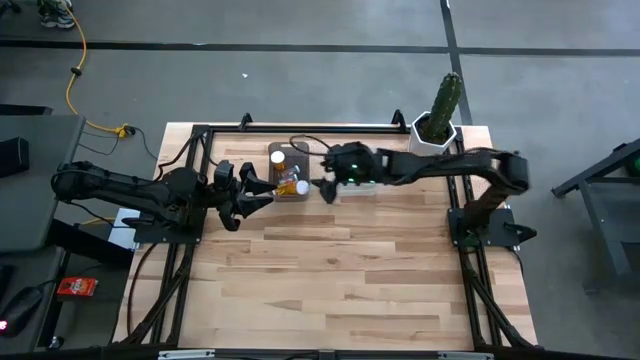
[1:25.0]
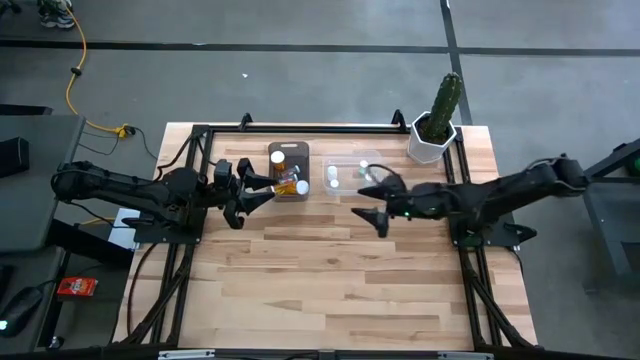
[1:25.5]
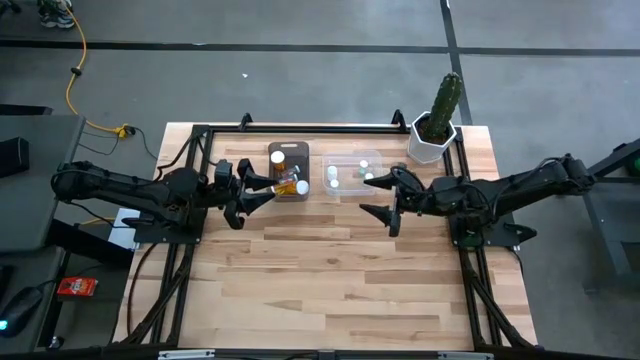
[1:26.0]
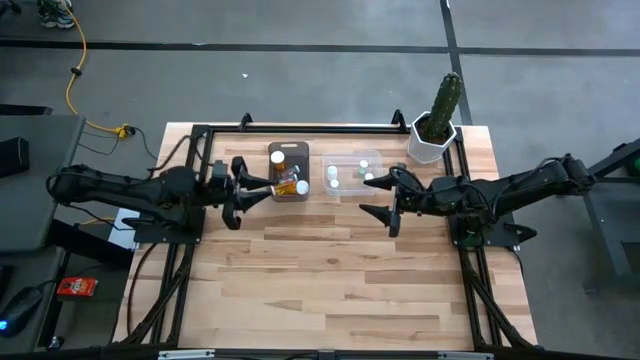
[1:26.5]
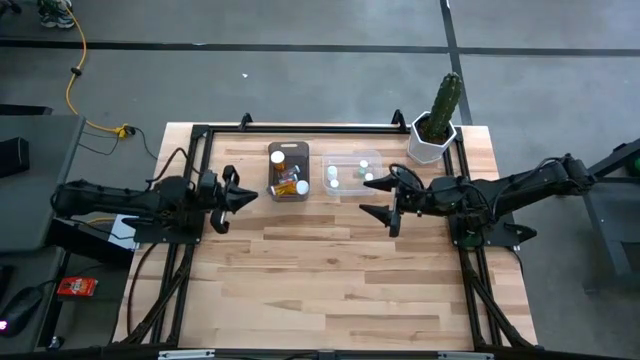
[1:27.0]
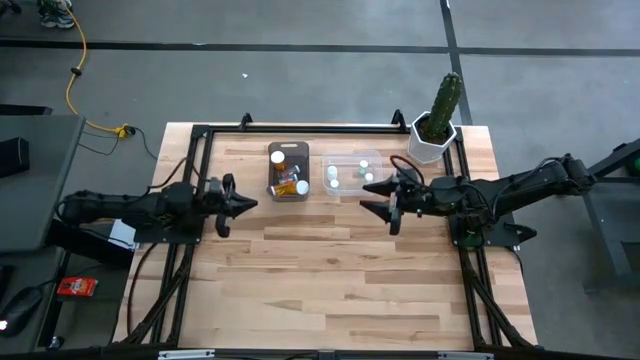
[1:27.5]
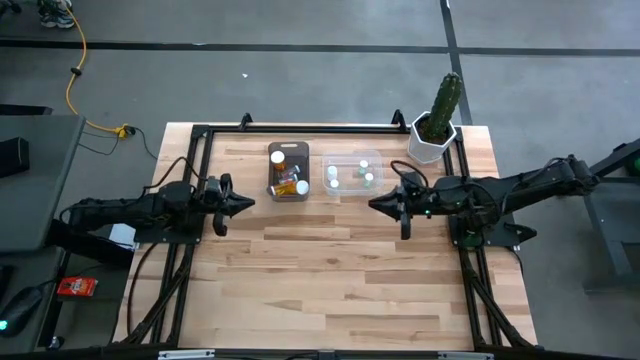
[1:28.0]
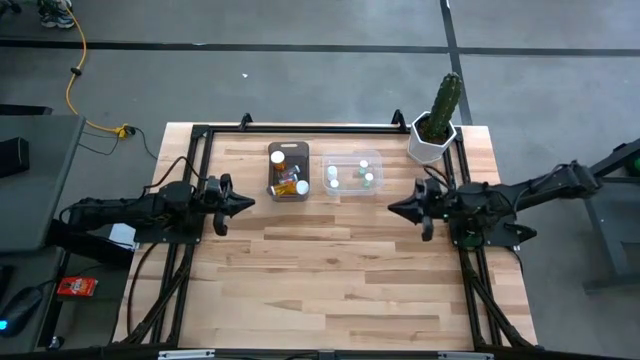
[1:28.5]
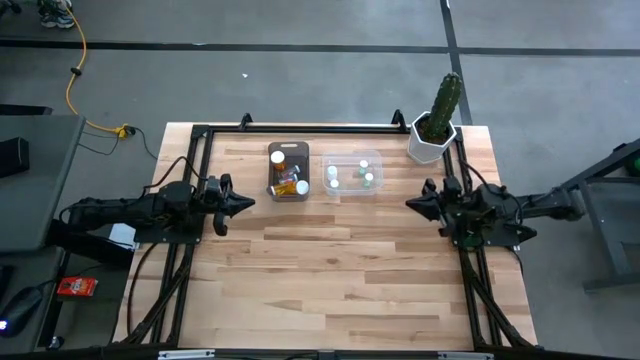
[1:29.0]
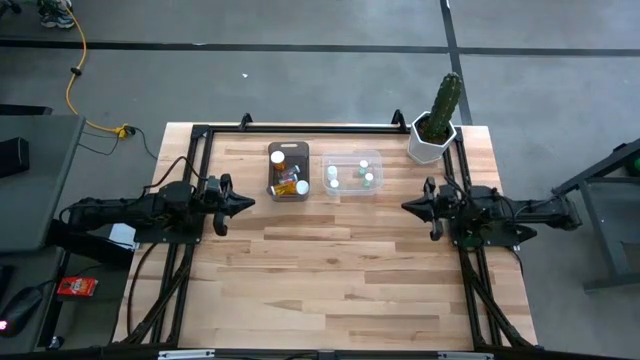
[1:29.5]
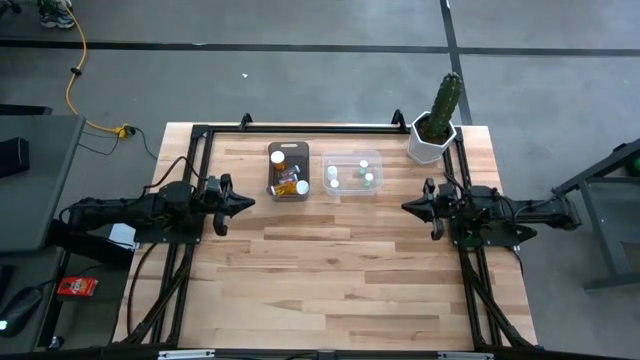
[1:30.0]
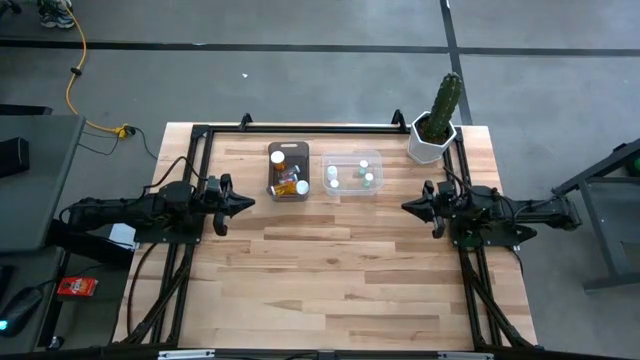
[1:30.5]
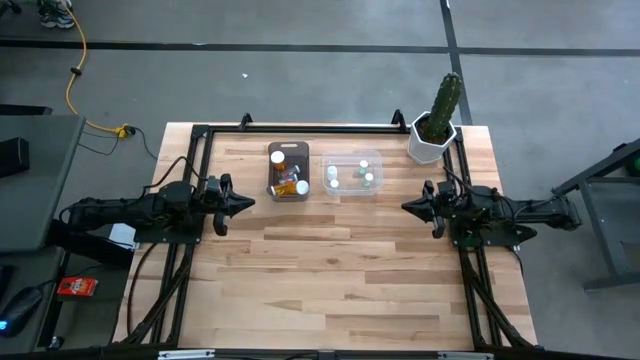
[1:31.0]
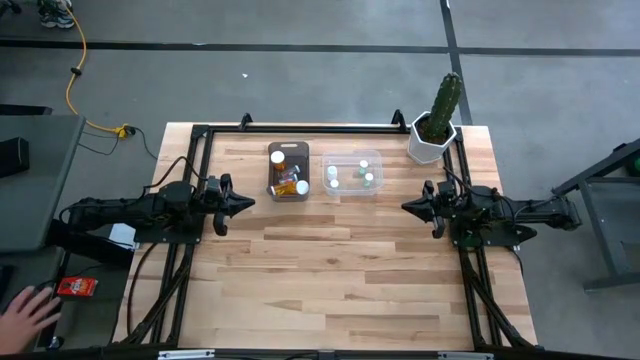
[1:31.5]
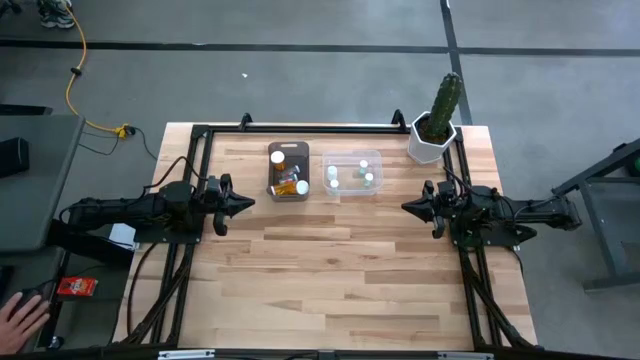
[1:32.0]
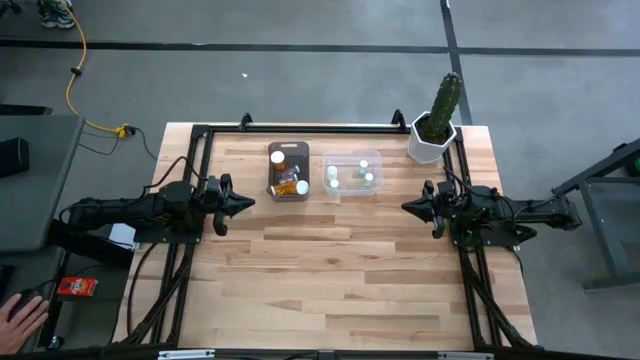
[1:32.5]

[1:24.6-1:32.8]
Task: Pick and place medicine bottles into bin by pill shape (circle, oval)
Return to Home Position

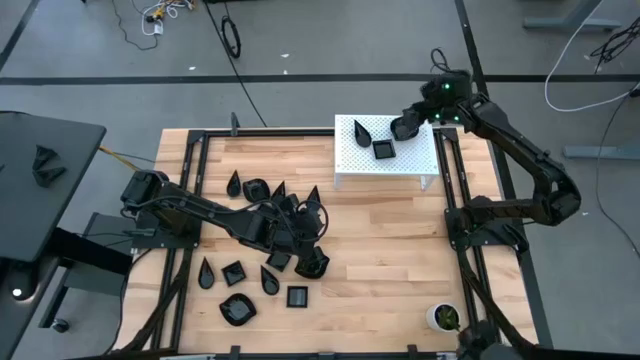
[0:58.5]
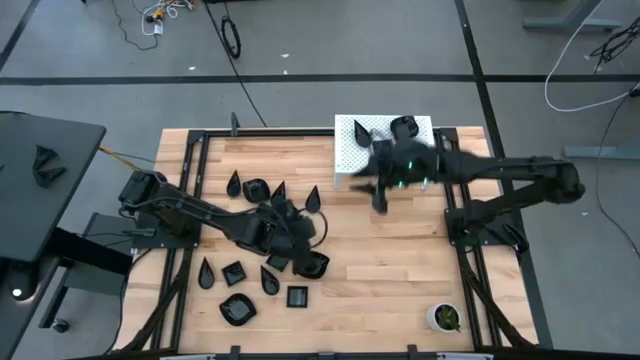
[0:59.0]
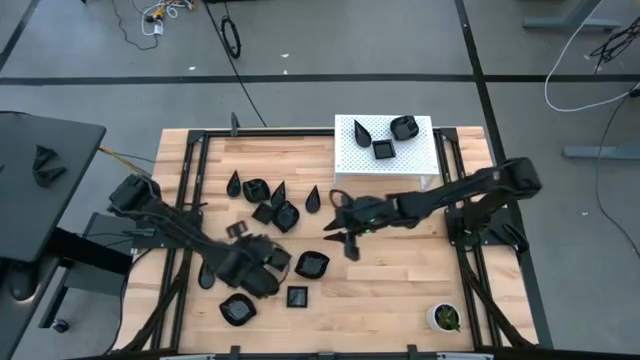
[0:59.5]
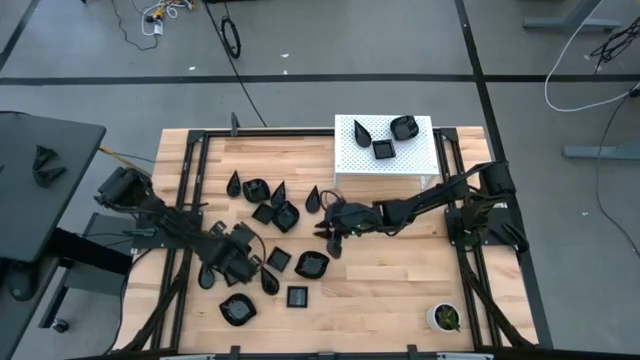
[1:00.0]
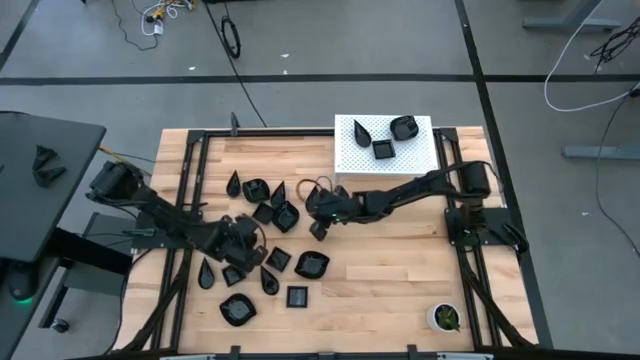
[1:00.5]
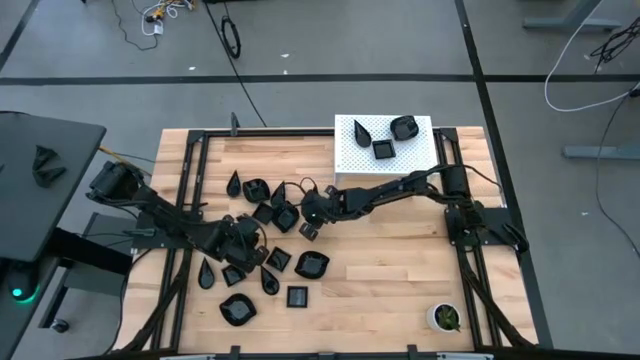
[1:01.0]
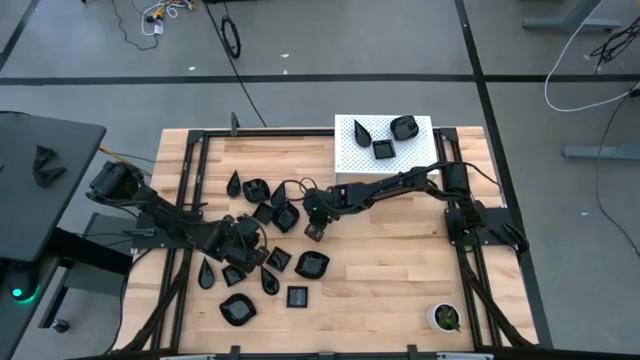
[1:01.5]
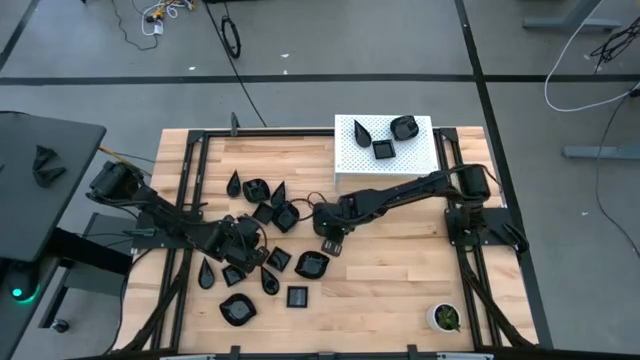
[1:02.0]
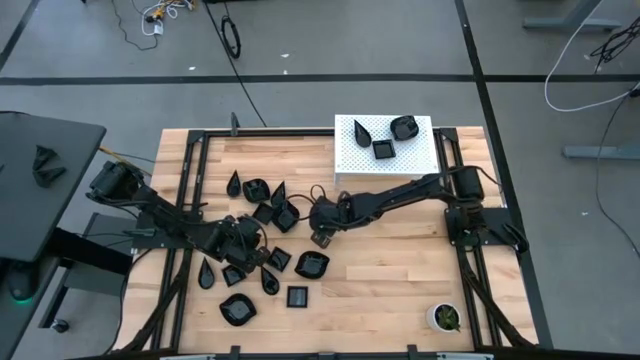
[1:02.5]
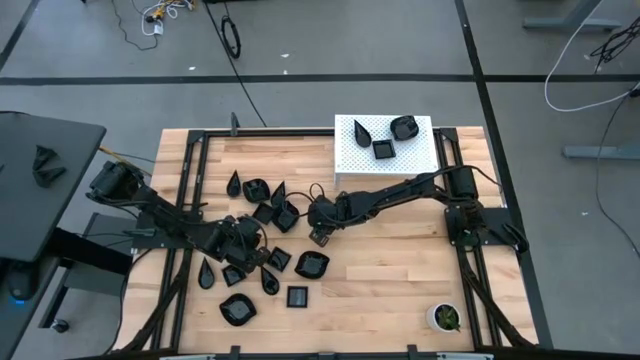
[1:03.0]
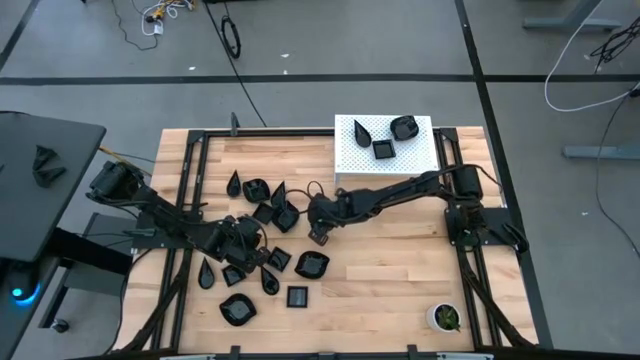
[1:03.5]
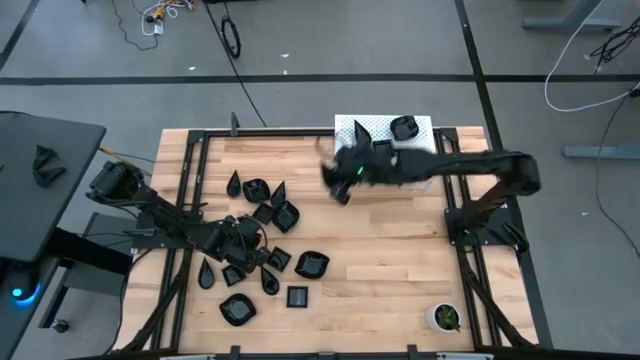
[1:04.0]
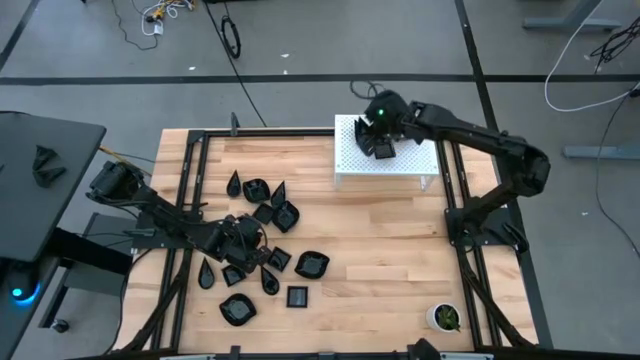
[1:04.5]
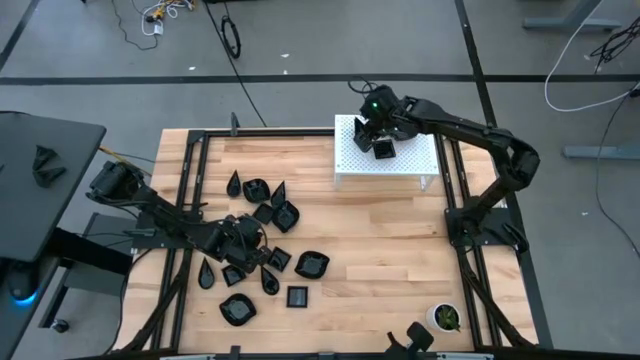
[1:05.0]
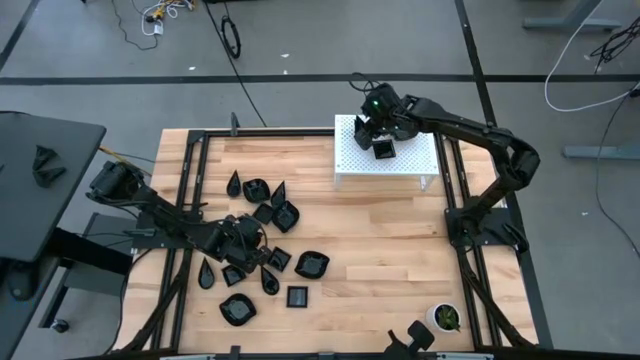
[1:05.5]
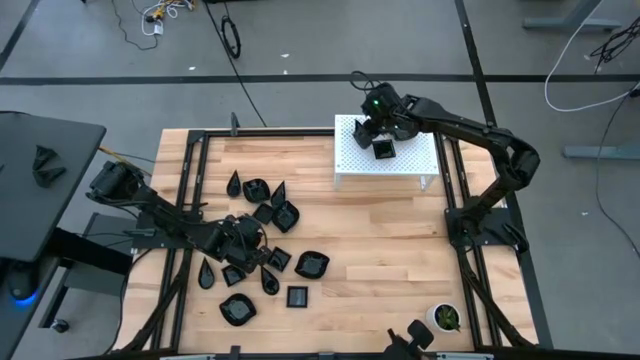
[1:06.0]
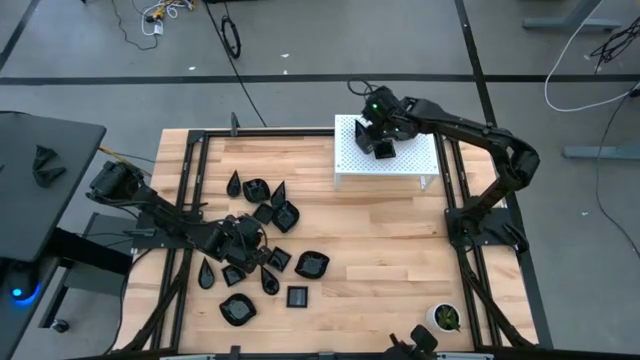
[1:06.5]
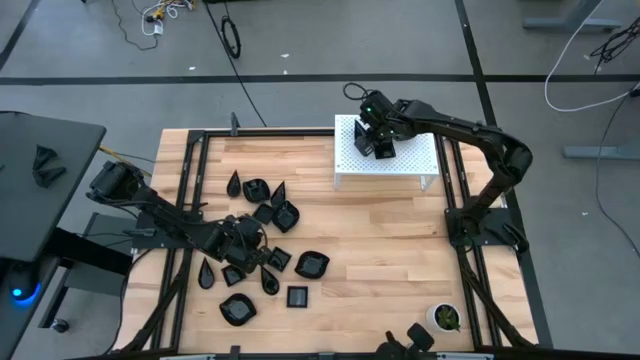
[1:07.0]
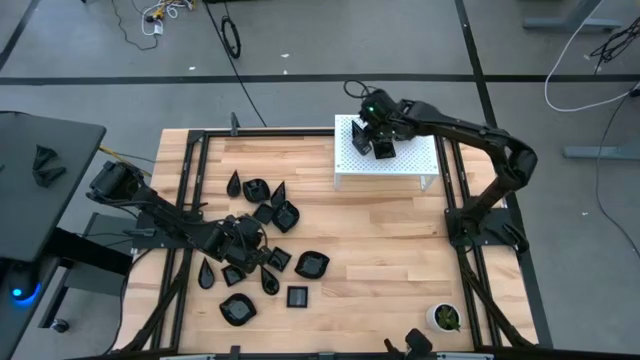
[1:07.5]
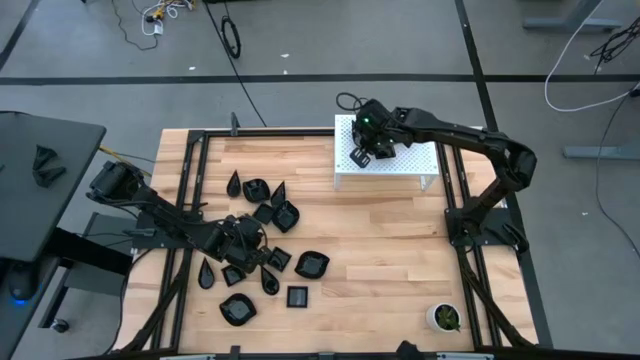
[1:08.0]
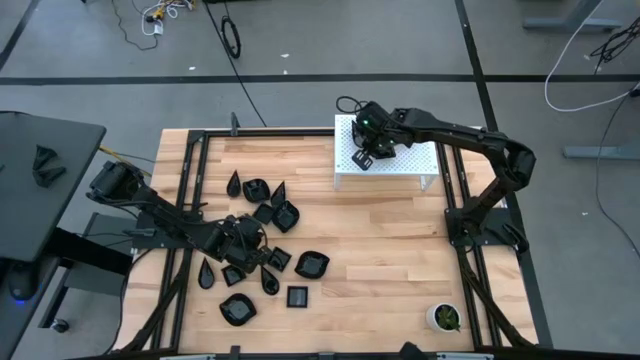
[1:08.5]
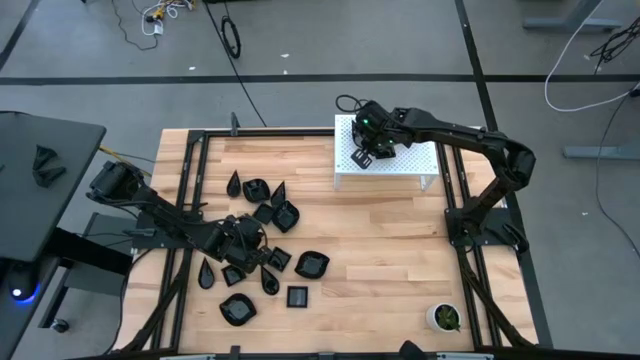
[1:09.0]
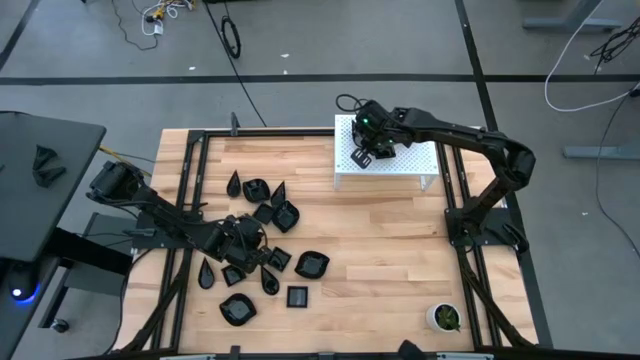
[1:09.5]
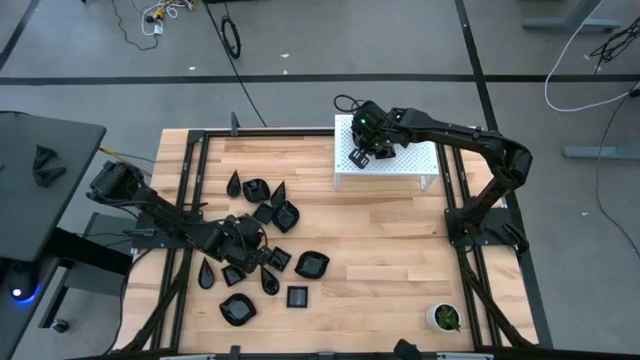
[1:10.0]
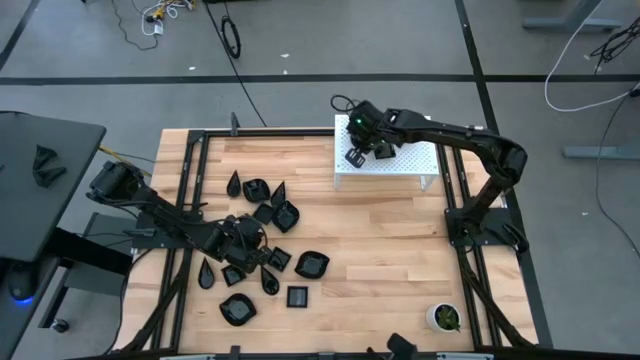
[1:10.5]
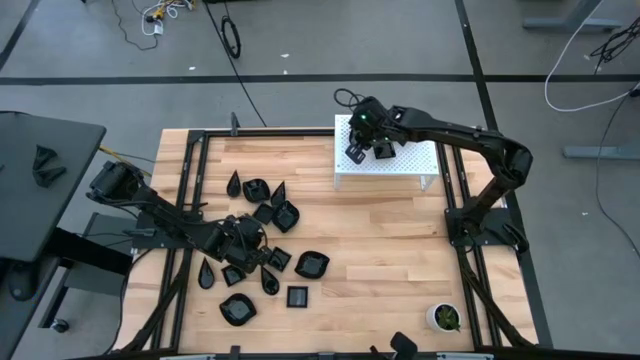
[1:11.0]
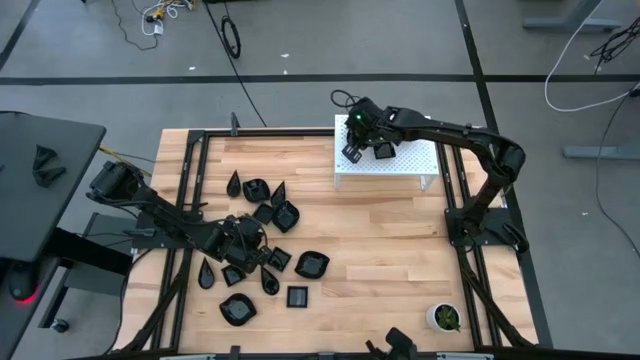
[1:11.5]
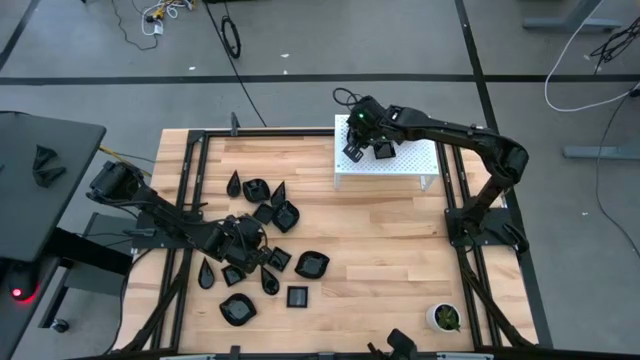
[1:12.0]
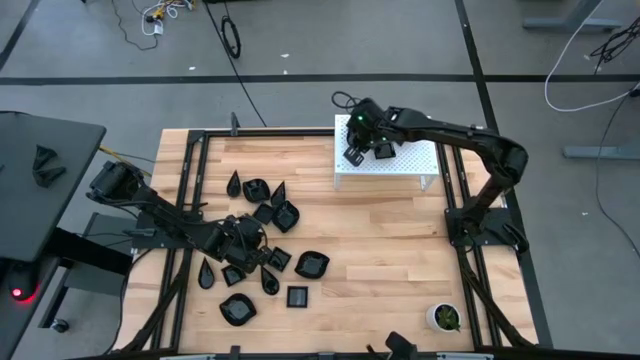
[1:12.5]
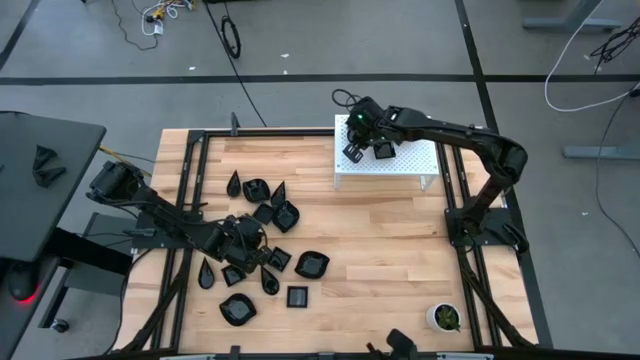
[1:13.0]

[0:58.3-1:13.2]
Task: Pick & Place Mini shaped plates
Stack the black drop shaped plate on the black drop shaped plate on the shelf
